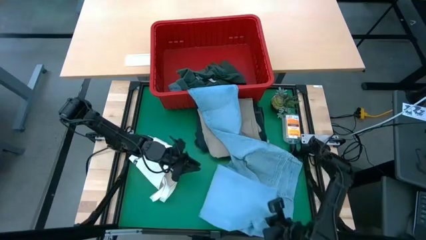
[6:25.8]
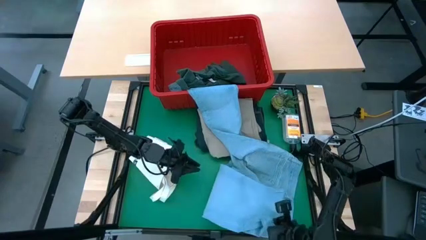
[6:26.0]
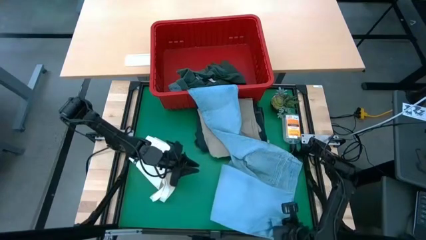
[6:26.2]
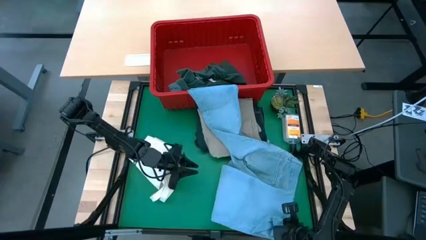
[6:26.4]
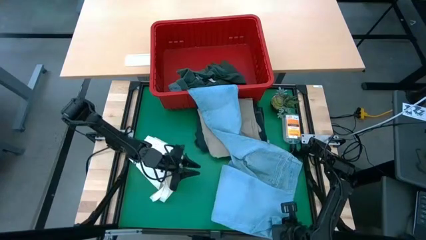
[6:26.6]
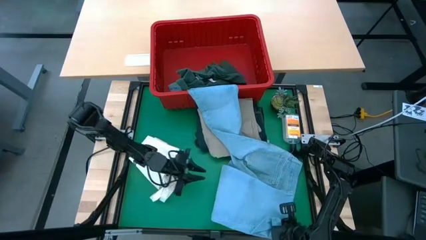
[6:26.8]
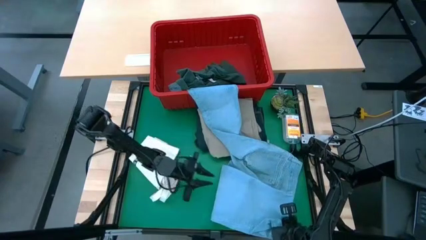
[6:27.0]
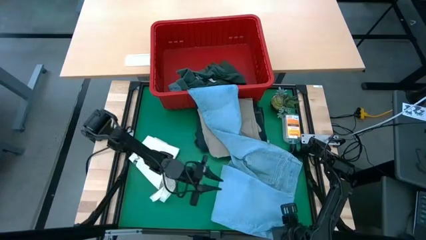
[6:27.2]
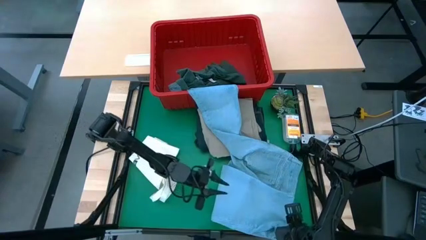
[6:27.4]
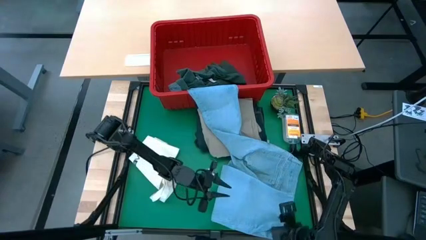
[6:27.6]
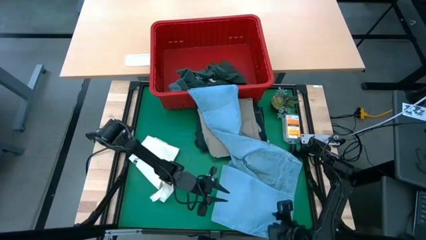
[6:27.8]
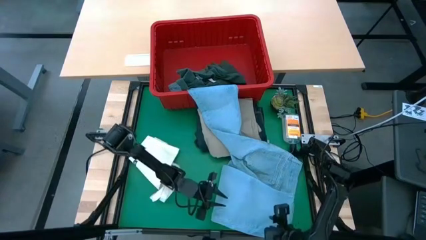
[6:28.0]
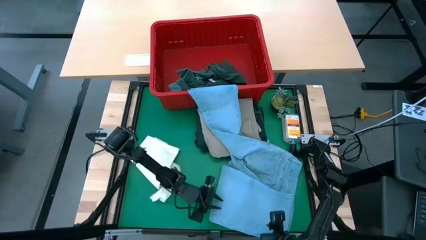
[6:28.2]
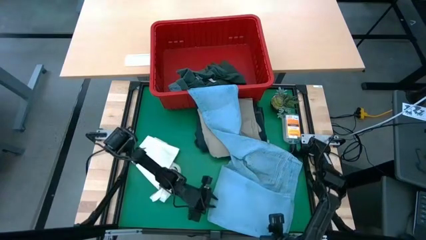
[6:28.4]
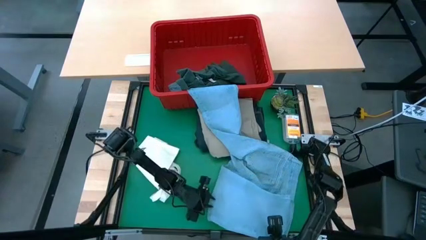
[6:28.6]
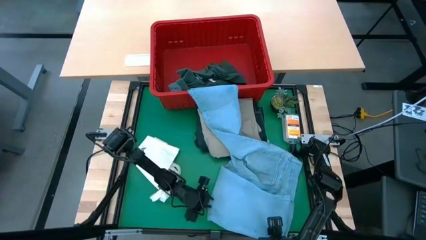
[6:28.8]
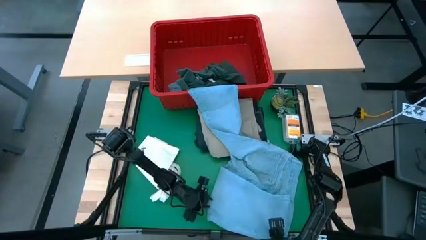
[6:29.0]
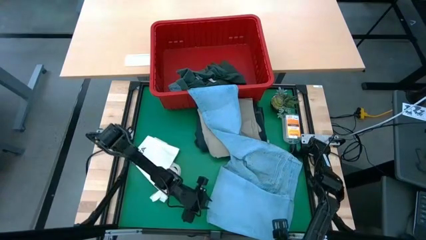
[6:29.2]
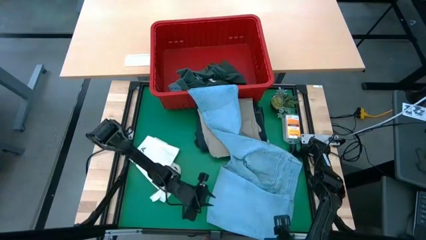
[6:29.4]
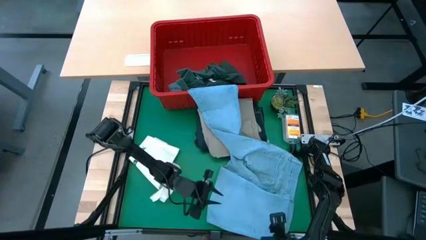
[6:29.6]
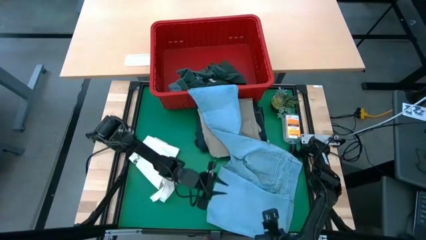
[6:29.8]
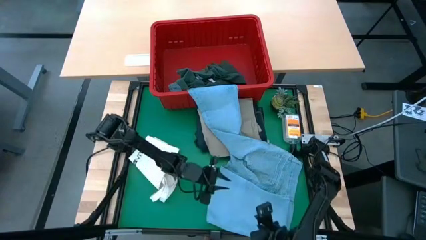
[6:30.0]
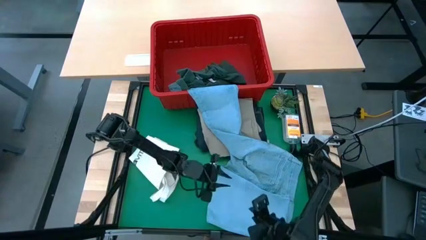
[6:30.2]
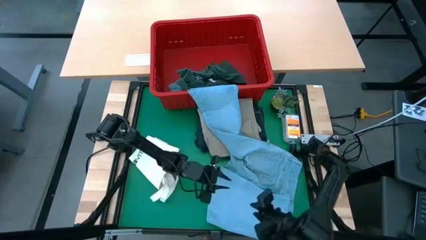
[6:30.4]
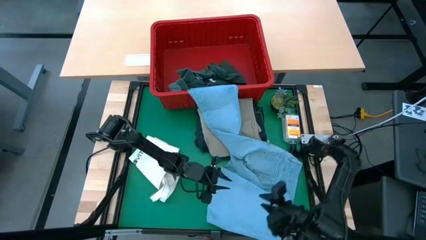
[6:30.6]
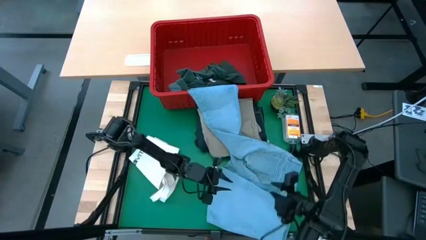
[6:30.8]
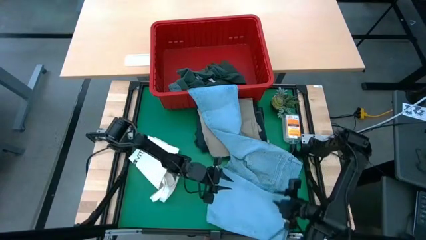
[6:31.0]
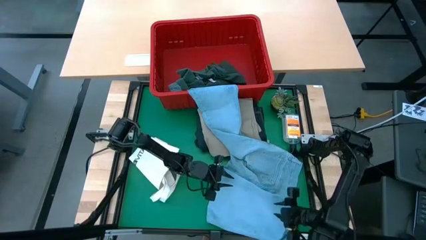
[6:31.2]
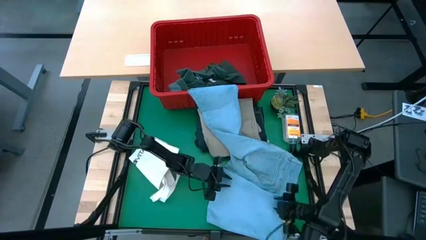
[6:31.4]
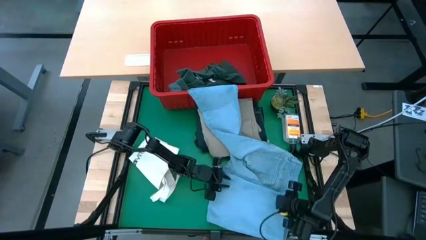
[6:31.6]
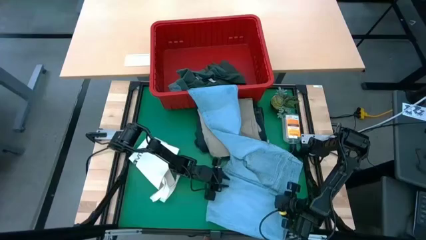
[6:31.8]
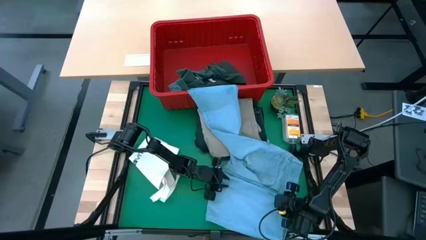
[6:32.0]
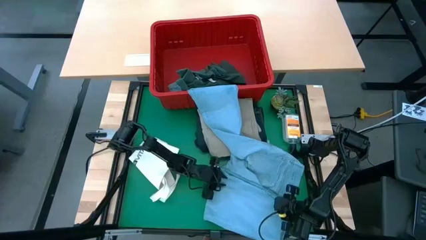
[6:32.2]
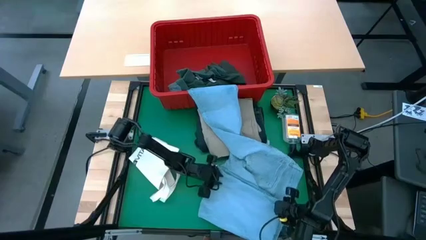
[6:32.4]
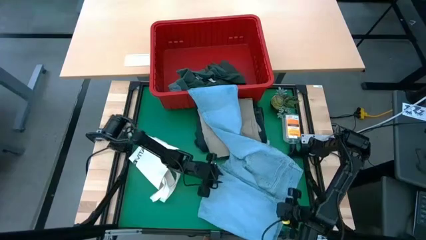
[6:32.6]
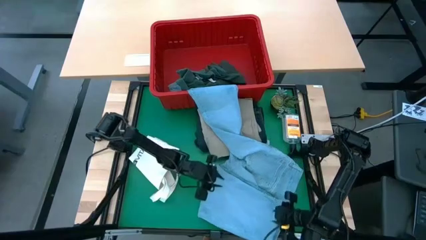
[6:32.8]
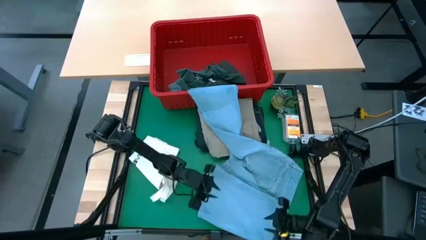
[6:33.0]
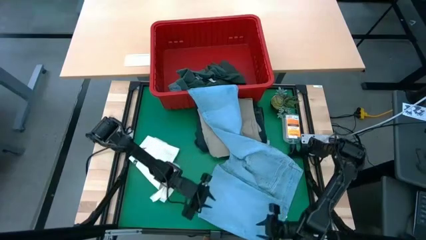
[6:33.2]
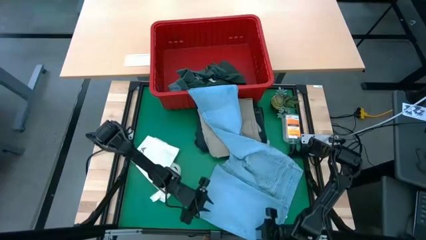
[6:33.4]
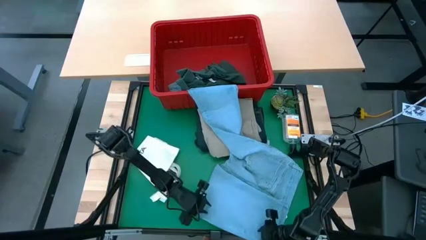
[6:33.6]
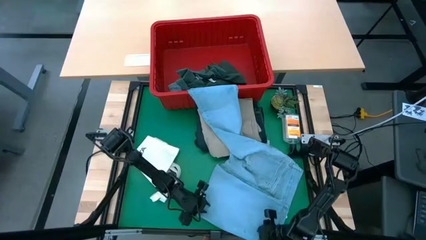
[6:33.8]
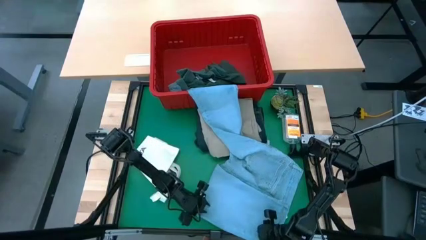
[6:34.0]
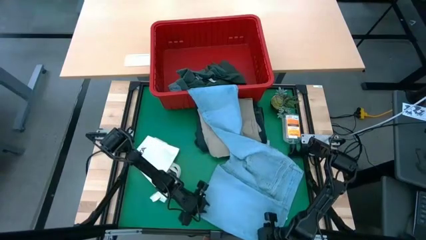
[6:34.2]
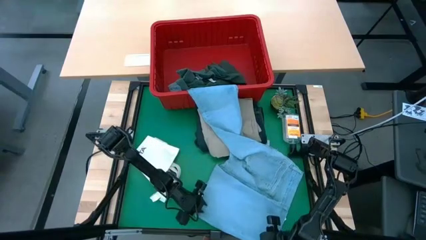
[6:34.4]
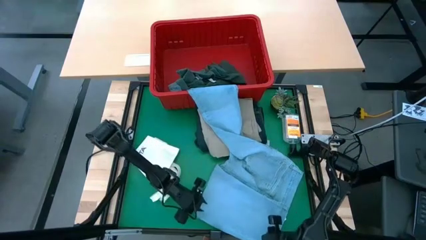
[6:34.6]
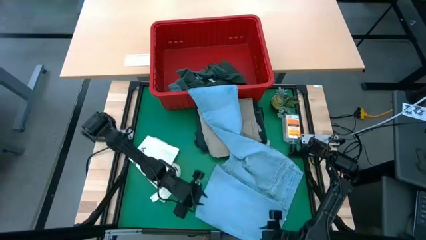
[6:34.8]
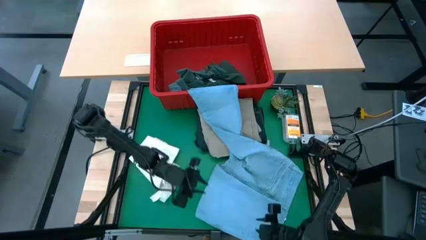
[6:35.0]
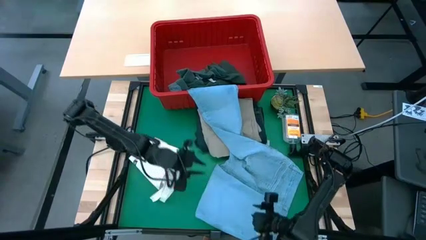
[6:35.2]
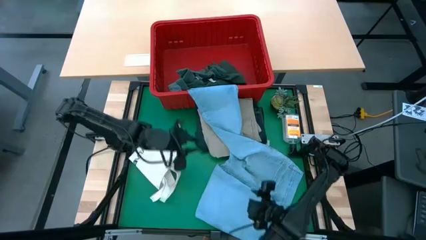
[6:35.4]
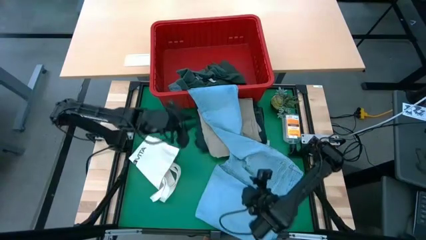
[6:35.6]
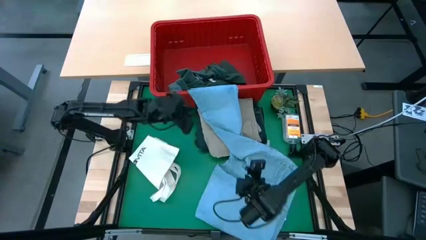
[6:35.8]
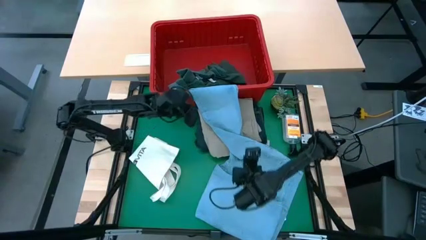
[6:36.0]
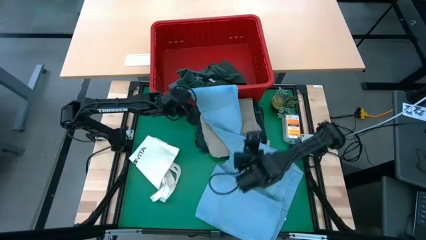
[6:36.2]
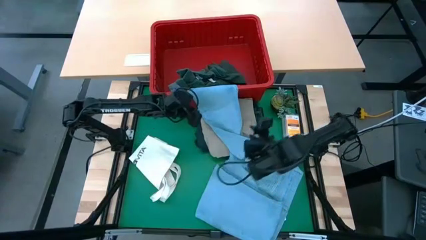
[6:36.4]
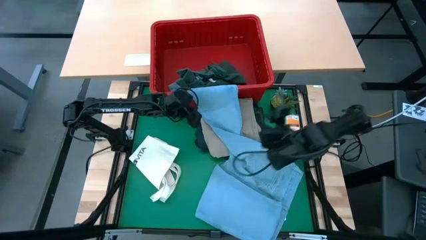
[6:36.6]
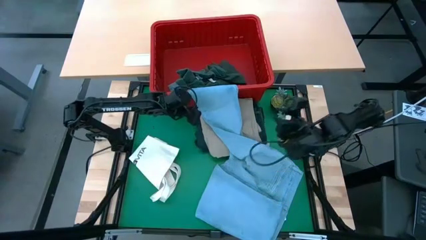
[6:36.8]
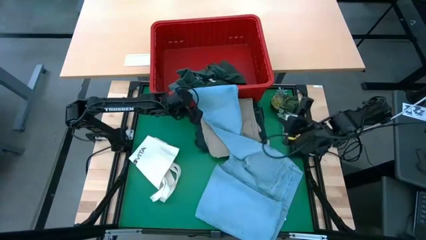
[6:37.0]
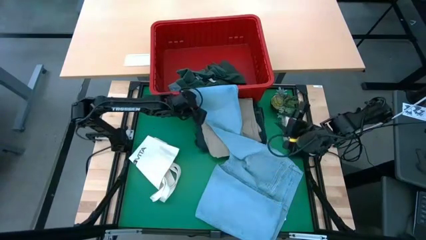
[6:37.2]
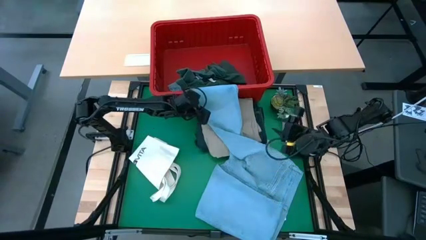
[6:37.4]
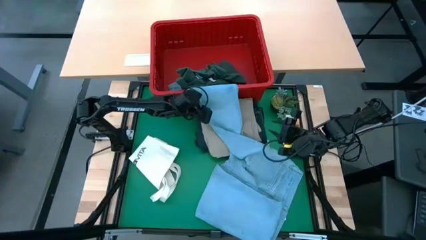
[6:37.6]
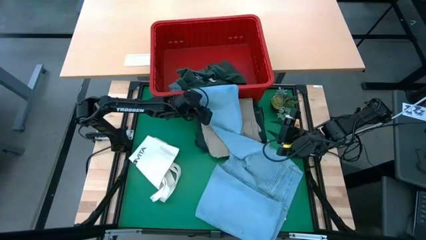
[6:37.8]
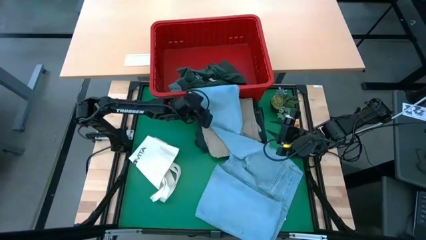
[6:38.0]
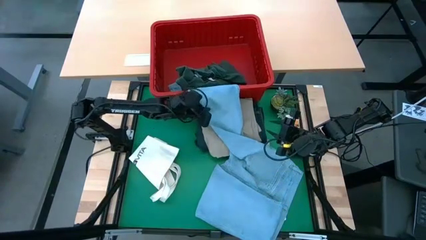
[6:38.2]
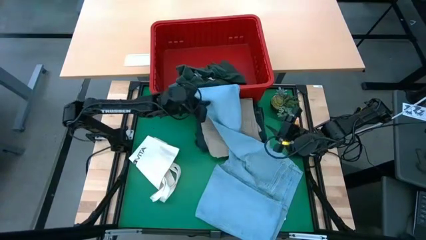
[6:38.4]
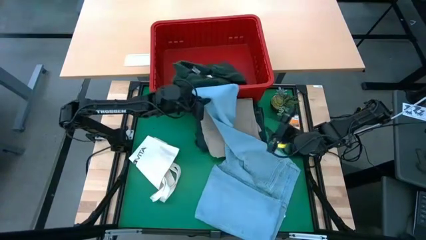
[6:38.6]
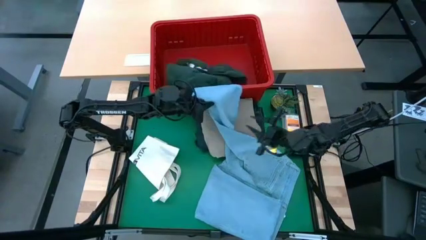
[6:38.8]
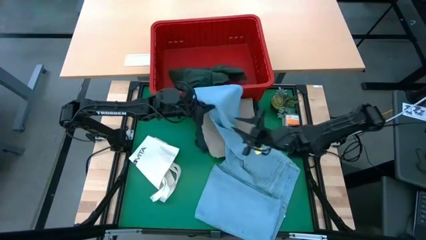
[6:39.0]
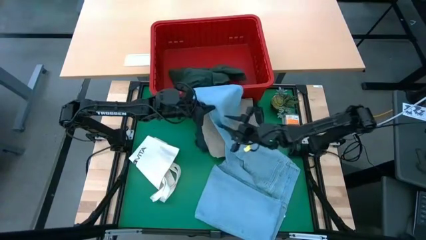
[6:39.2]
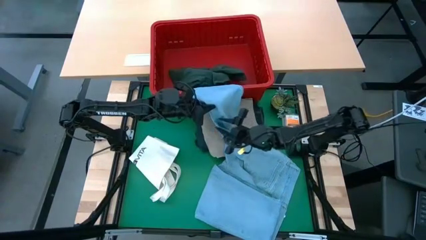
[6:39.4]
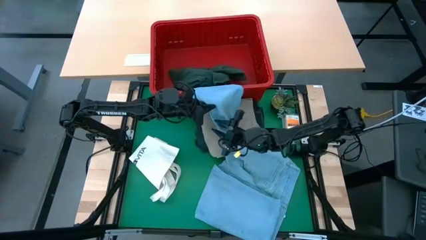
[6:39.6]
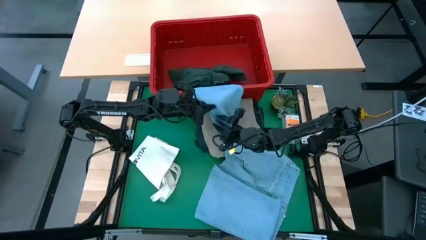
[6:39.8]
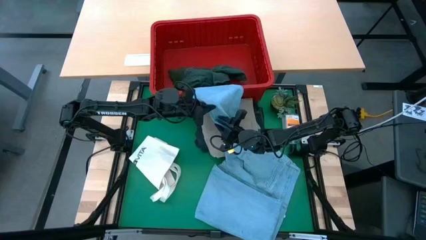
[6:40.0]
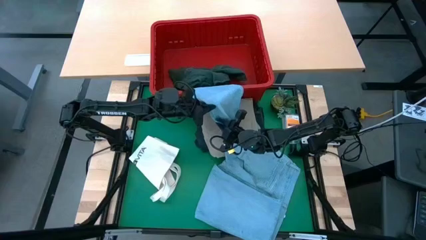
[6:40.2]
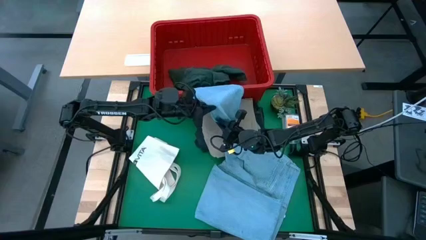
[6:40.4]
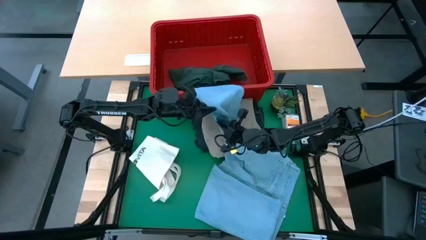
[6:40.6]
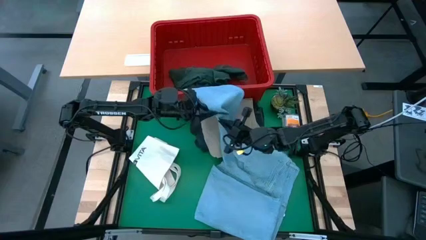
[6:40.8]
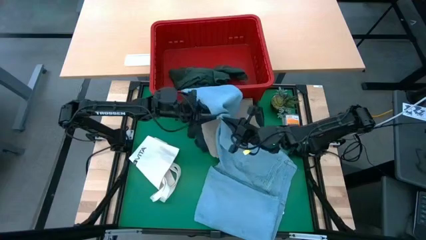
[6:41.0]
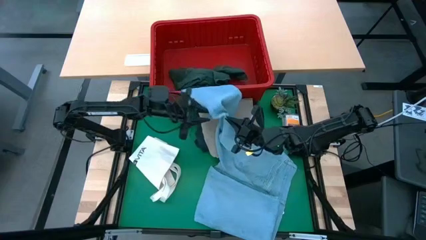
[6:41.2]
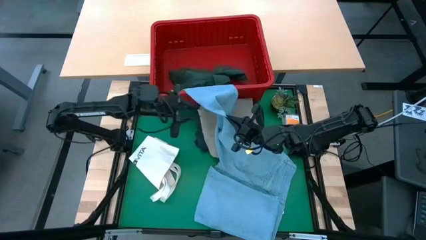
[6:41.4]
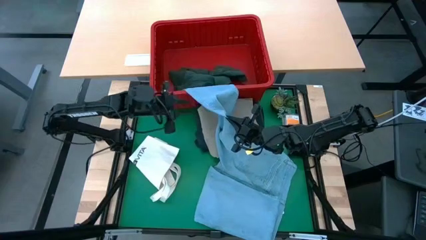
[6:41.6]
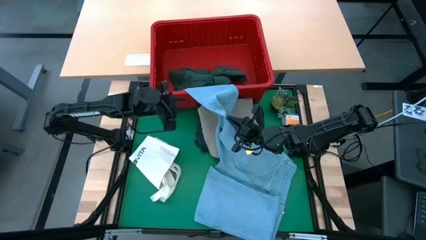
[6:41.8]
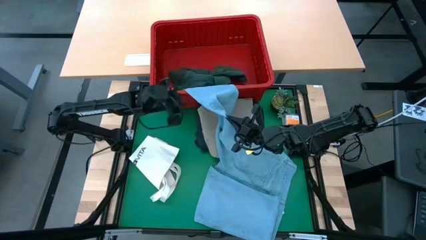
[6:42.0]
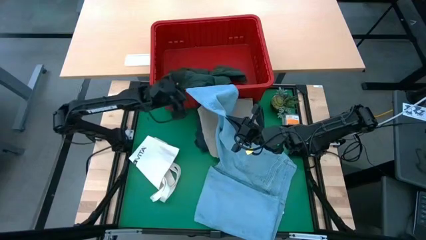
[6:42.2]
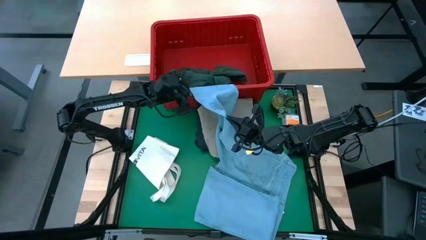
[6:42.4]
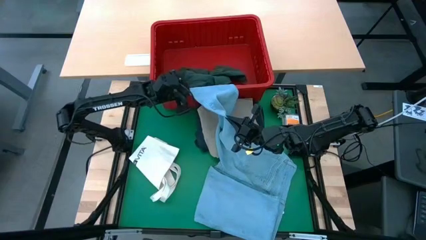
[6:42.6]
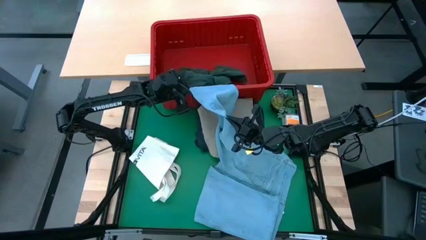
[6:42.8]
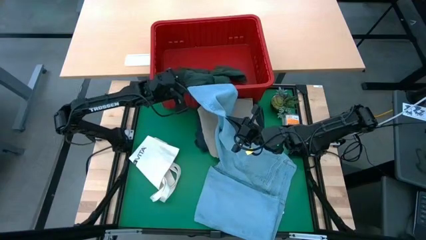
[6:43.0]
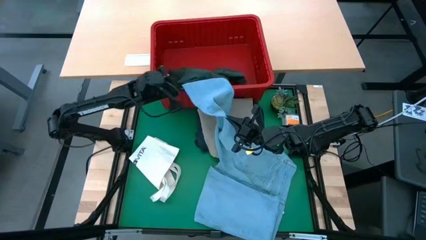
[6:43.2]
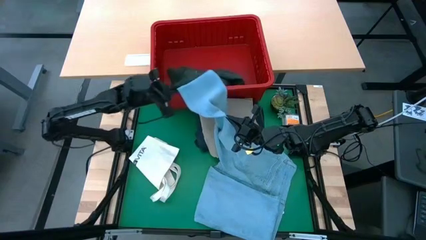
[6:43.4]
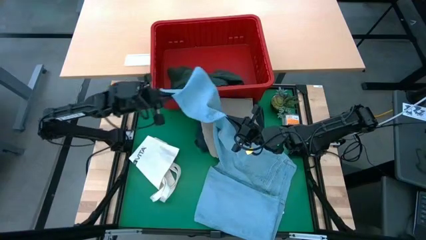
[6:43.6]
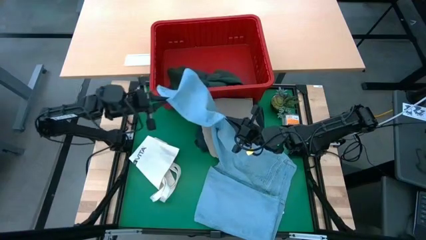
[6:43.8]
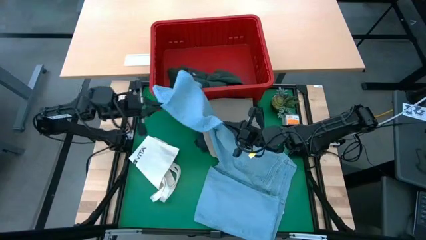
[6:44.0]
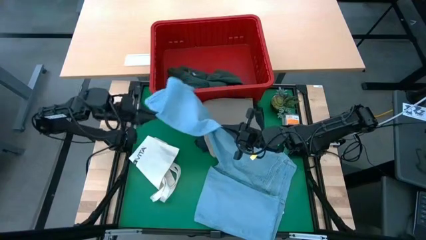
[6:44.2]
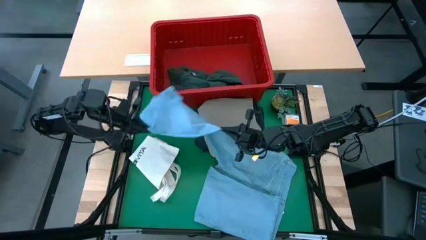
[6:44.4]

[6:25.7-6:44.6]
Task: Fold laundry
Remove the blue pants from the laundry bin
